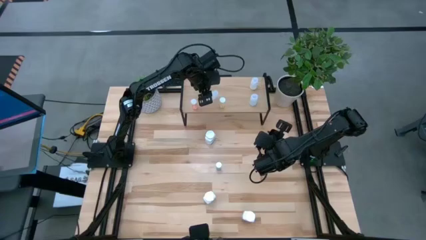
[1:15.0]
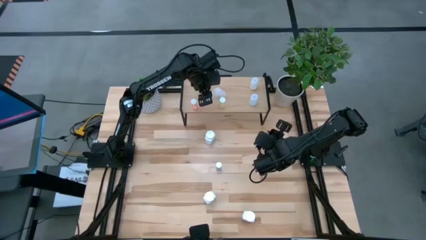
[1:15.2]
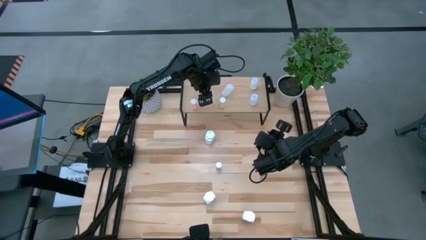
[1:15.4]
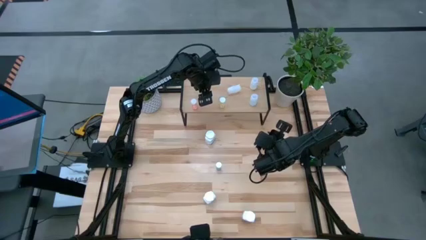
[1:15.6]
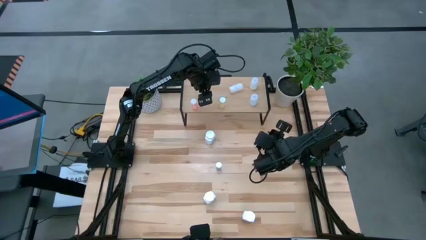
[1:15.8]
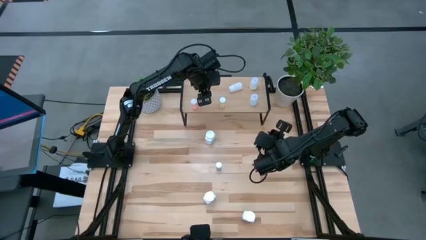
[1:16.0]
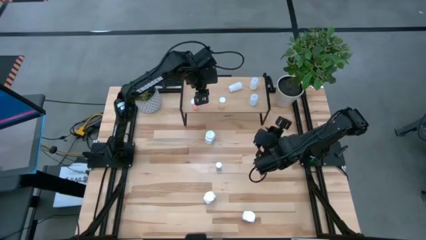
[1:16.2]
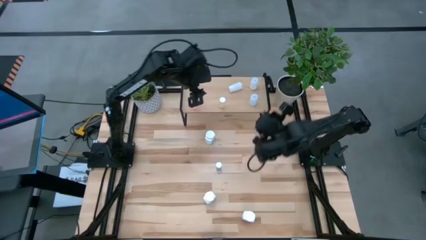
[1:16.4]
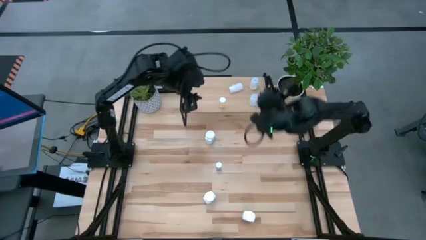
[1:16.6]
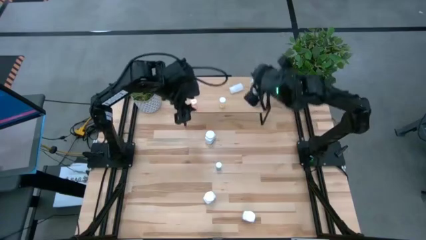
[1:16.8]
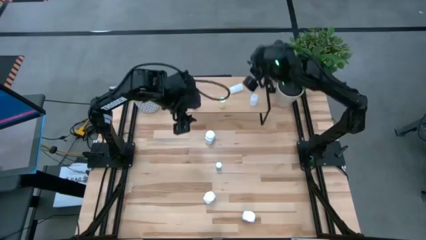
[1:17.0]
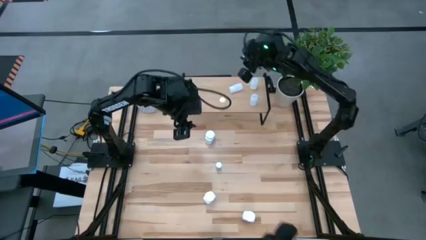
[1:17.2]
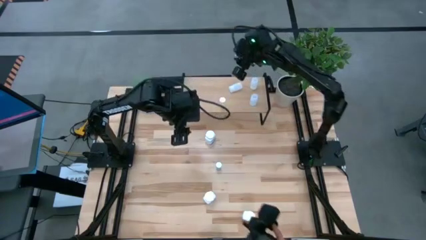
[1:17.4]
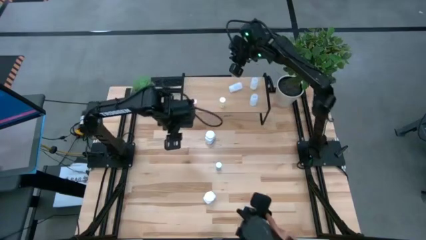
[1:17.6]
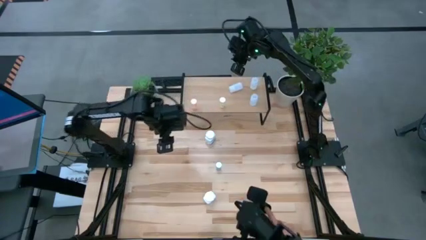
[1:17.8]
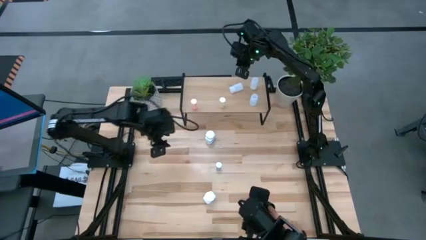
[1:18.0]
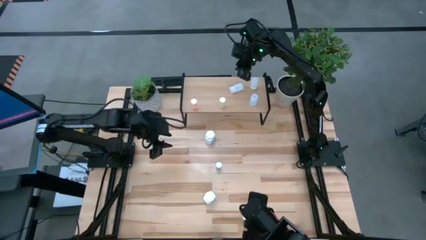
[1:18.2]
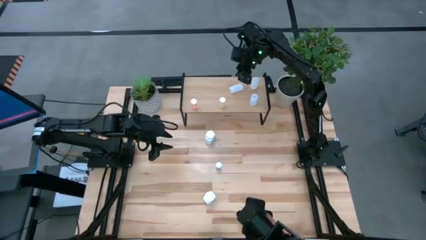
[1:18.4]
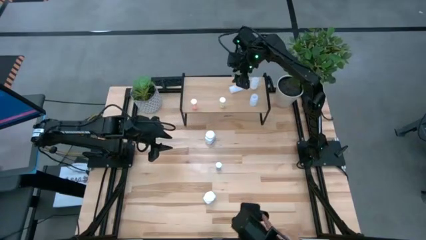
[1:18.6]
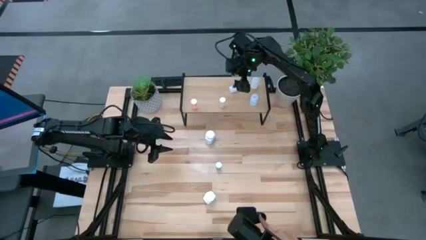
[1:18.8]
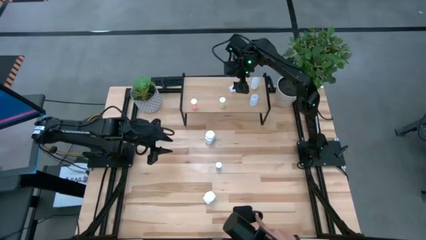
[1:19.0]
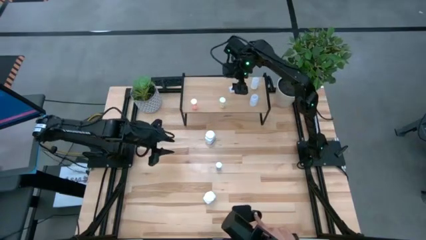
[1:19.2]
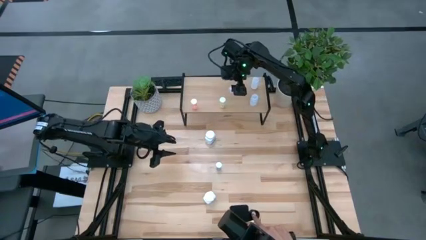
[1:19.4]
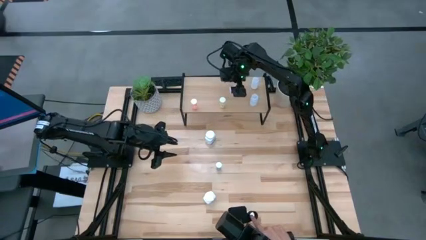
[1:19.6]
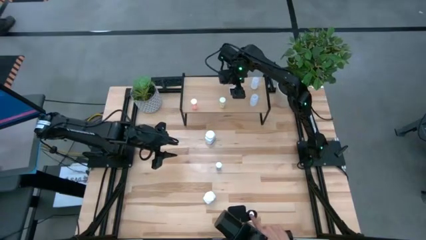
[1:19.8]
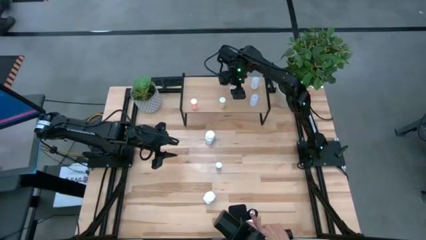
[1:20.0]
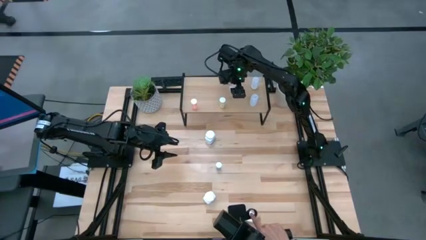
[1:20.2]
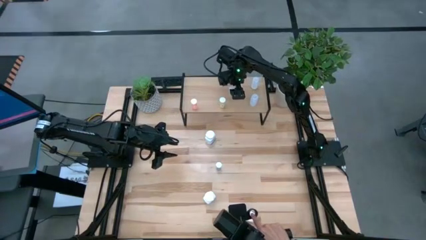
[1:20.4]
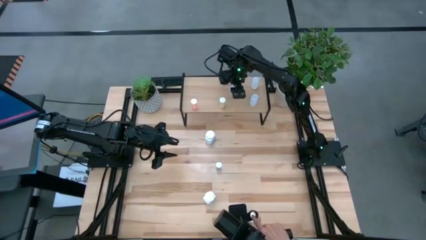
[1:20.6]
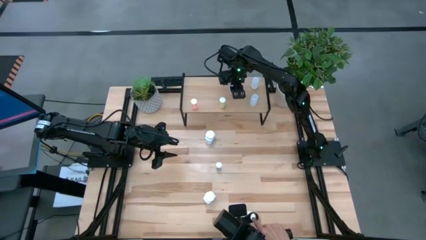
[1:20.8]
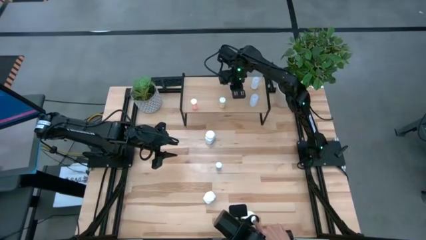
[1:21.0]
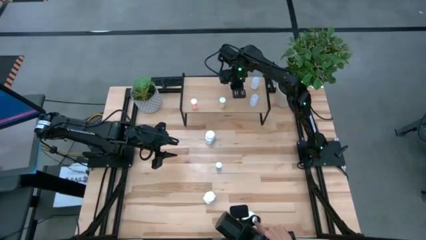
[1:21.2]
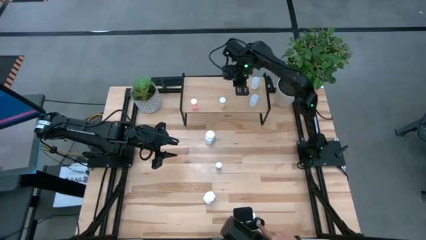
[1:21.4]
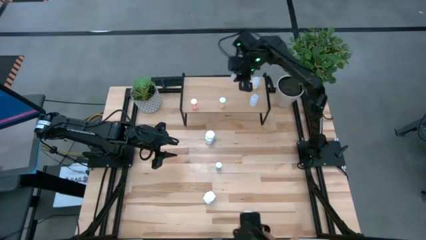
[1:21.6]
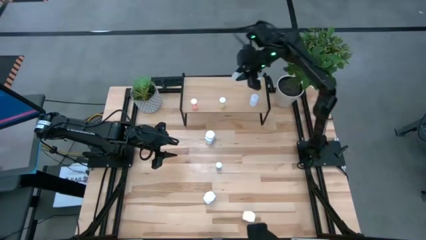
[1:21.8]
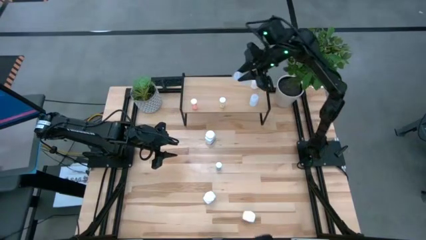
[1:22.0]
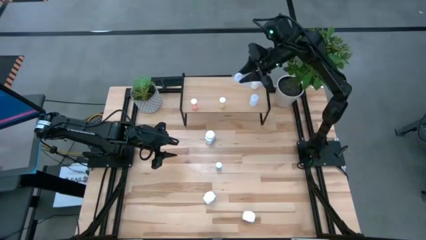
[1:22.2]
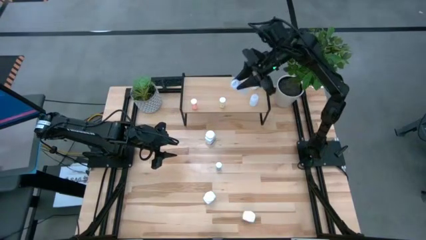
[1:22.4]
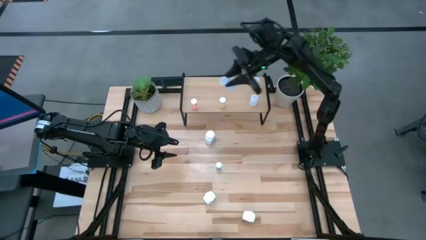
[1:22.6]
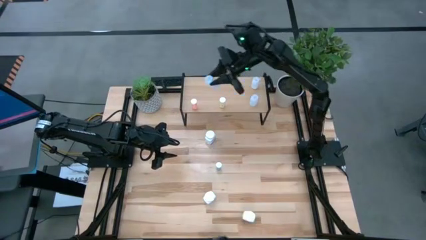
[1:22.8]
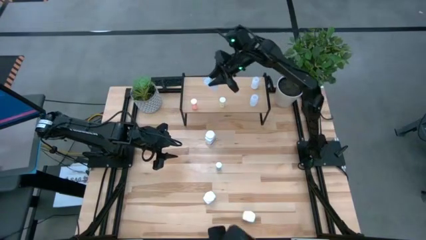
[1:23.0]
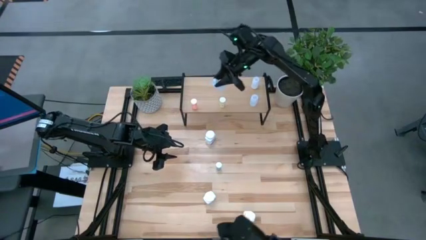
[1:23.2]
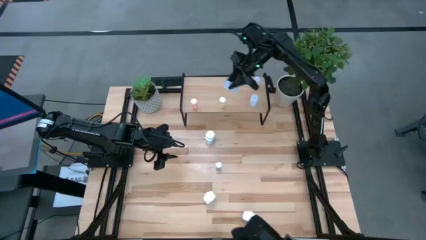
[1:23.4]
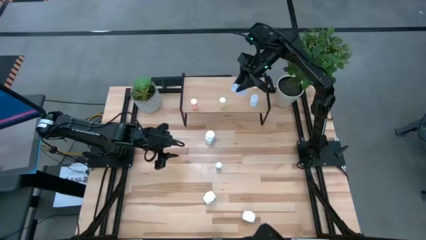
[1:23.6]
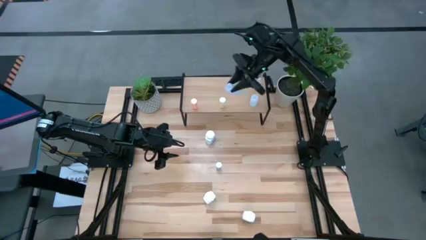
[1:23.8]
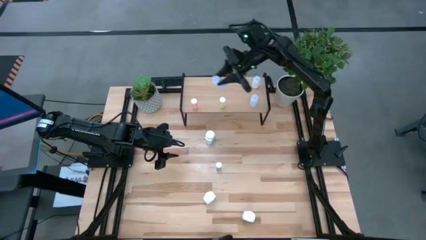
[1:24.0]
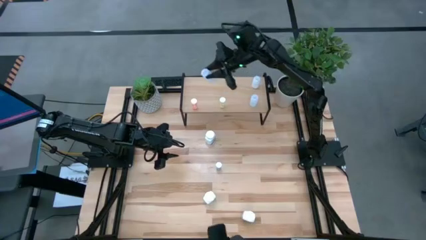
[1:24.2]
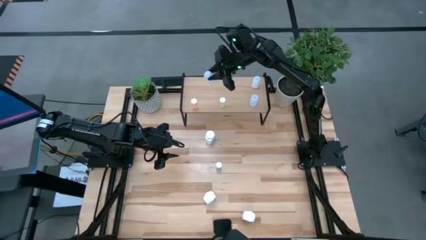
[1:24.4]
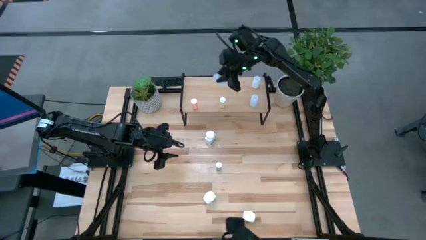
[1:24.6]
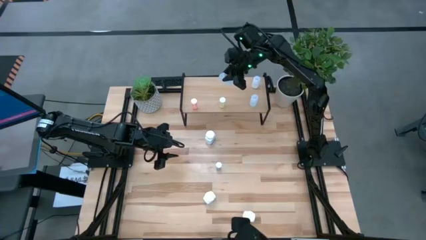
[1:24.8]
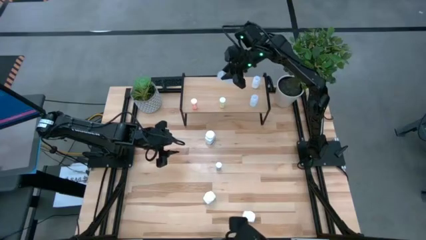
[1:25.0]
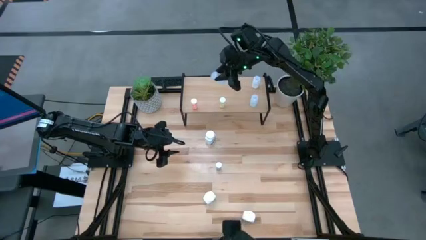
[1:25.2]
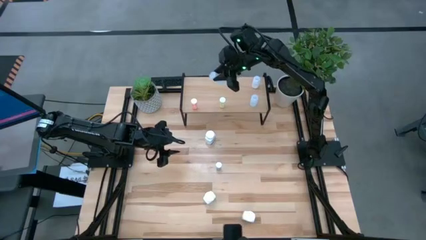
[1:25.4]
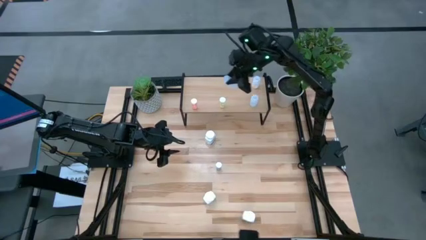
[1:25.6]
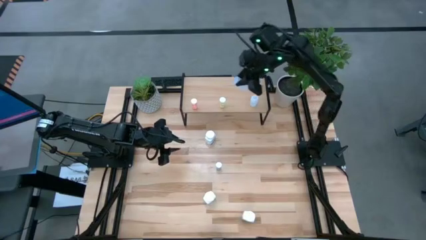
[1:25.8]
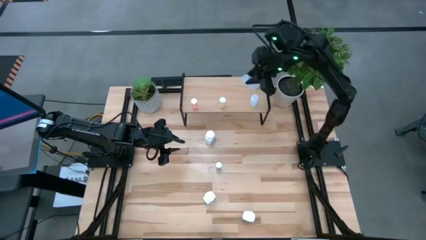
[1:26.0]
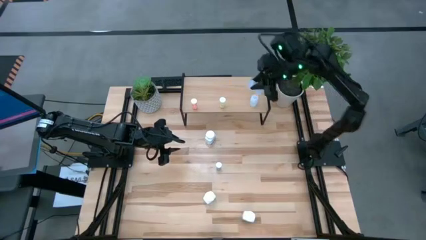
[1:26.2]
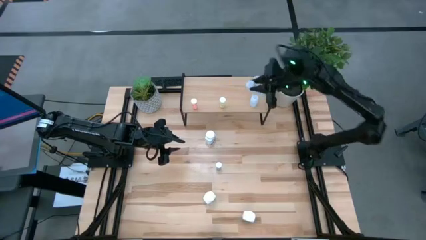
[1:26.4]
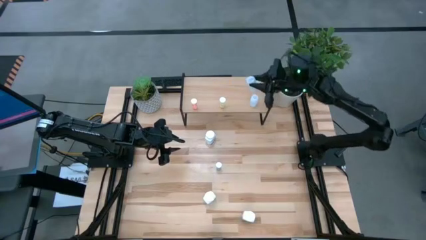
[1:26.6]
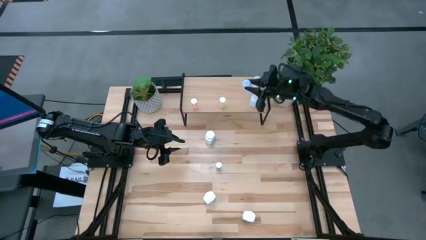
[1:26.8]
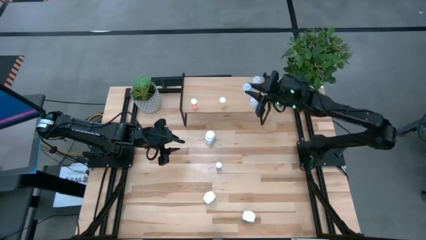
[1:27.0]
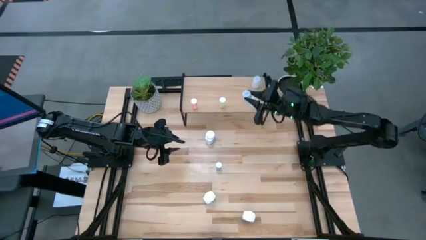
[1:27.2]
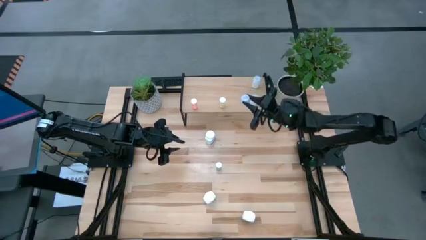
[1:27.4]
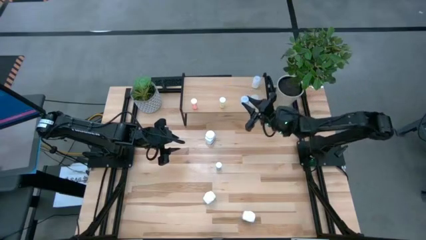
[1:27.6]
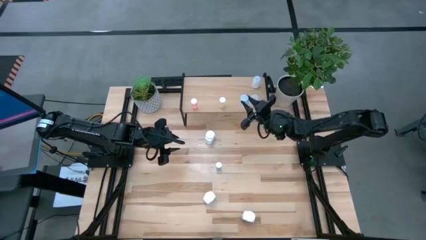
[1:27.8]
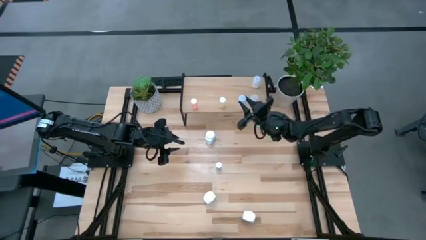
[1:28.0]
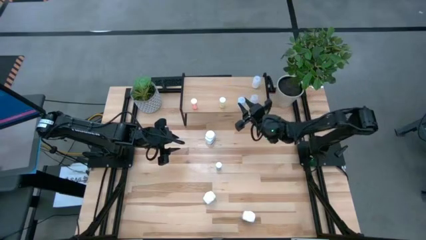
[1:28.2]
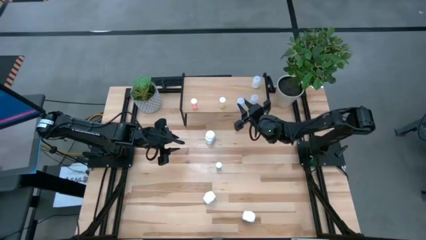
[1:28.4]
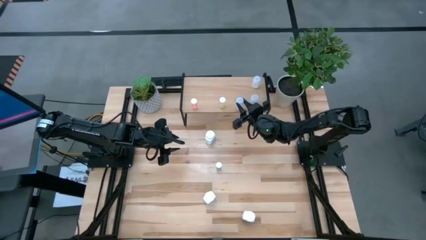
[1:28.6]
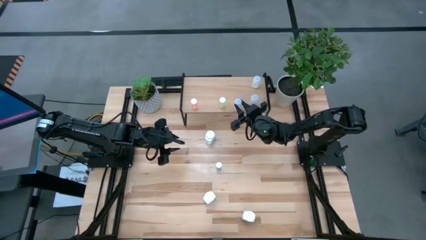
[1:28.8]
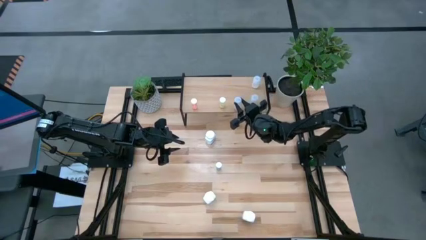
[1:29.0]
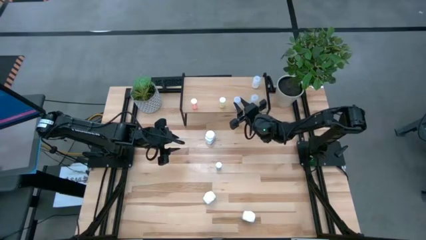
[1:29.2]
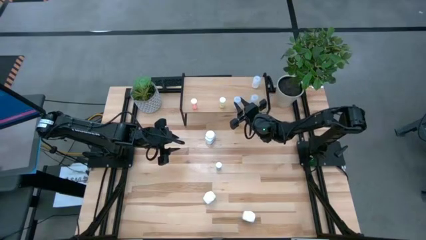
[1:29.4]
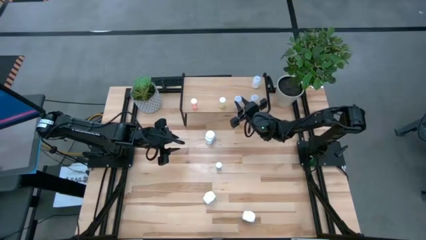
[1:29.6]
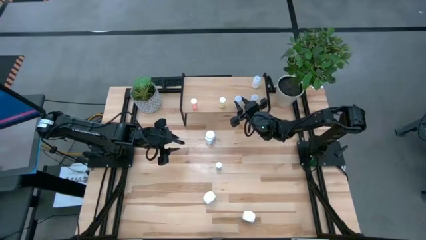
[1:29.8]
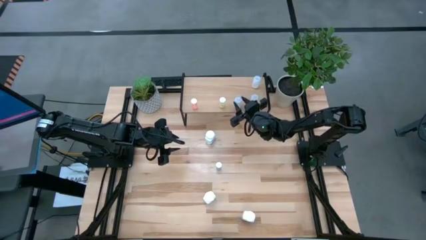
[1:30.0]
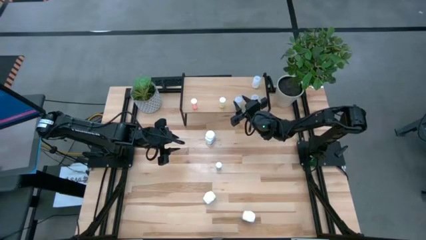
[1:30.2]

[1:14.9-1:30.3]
Task: Pick and place medicine bottles onto shelf by color
Put the white pill bottle on the shelf
